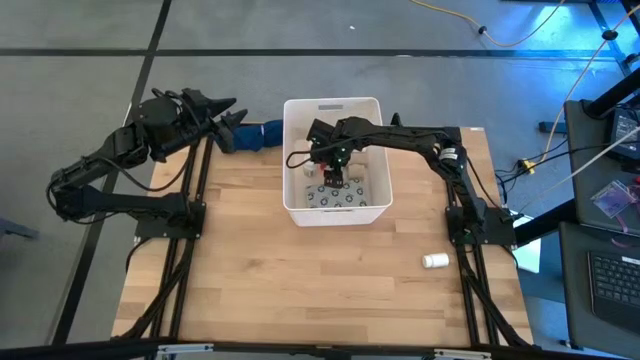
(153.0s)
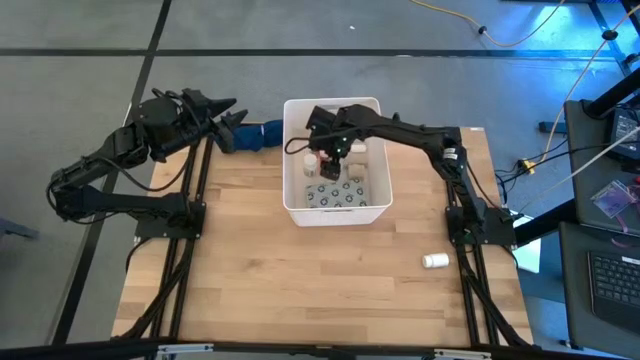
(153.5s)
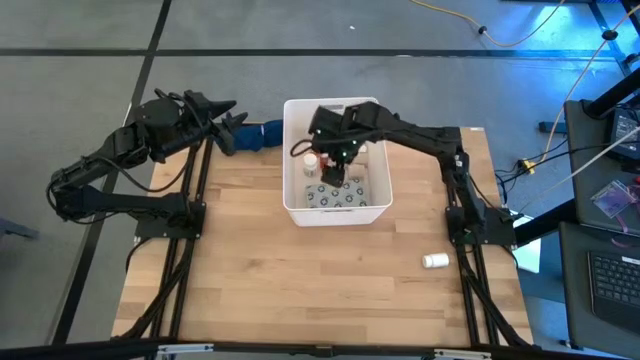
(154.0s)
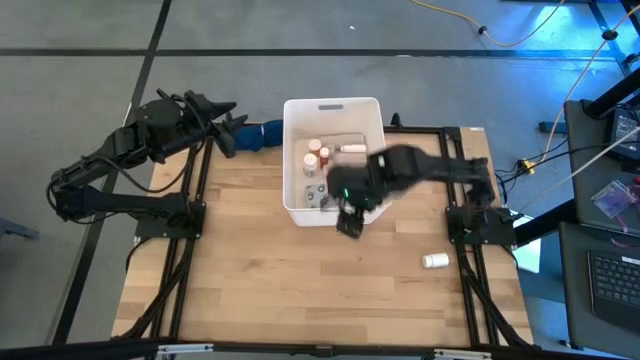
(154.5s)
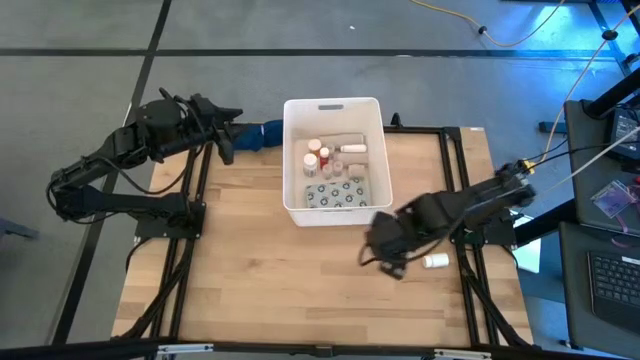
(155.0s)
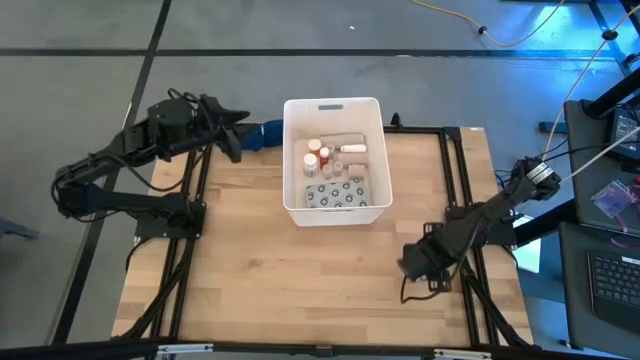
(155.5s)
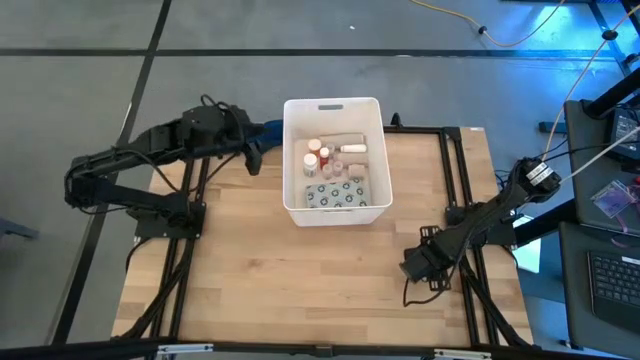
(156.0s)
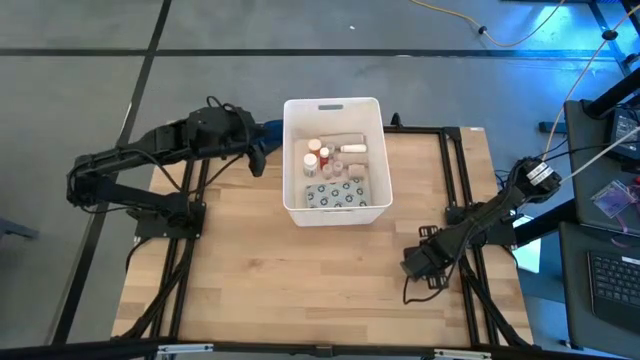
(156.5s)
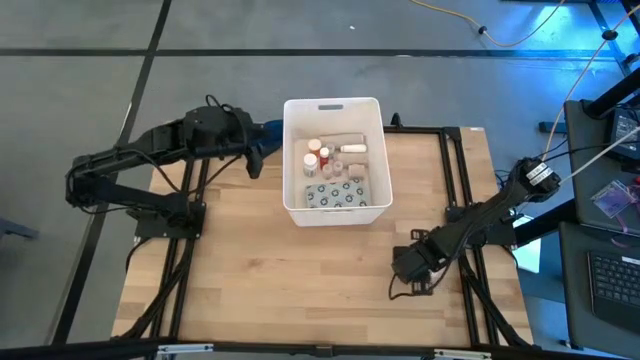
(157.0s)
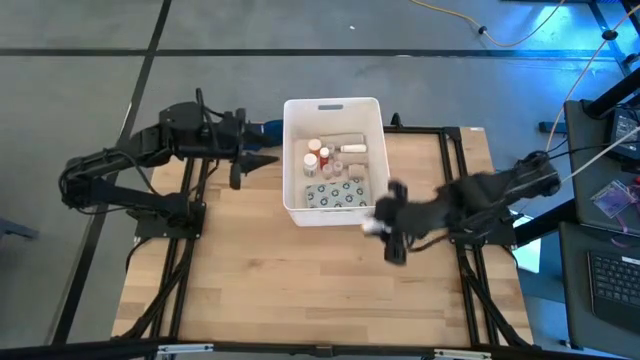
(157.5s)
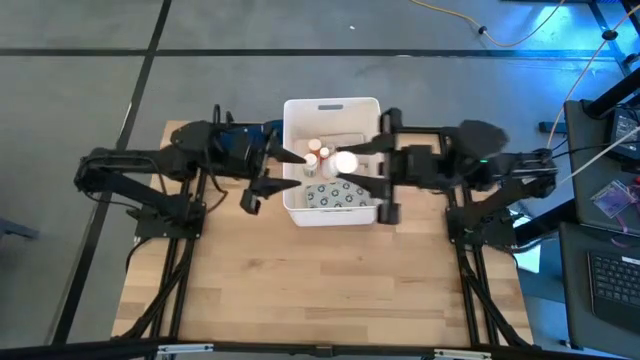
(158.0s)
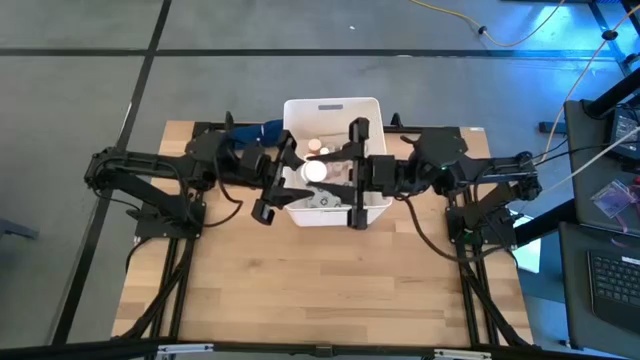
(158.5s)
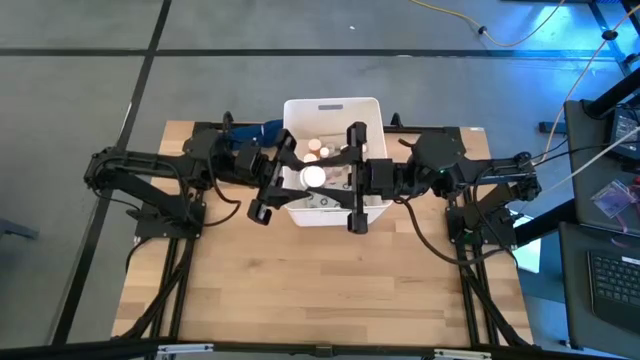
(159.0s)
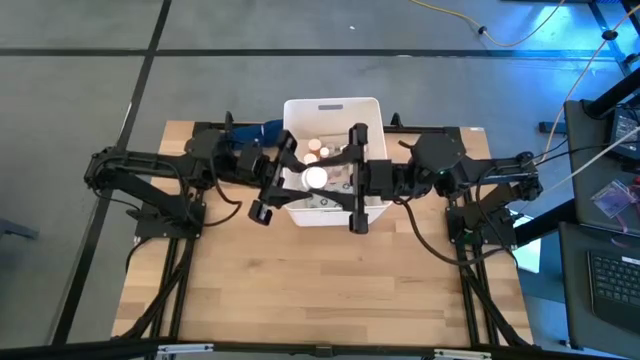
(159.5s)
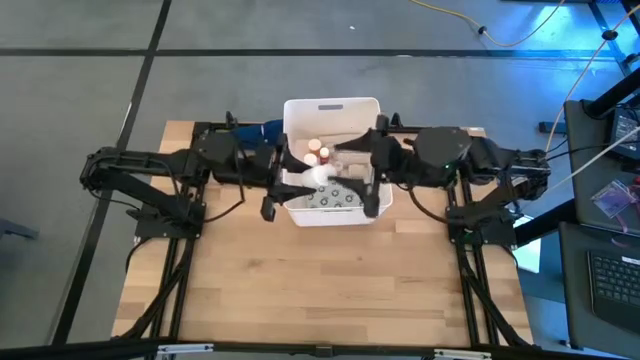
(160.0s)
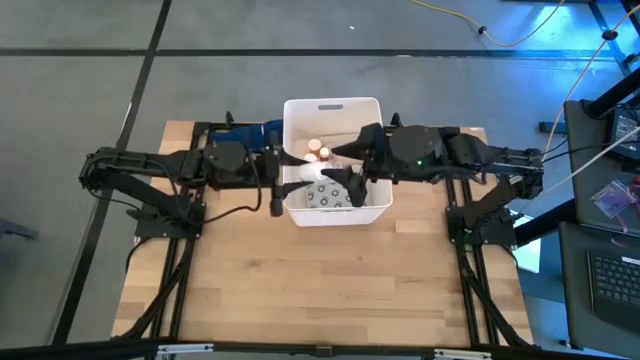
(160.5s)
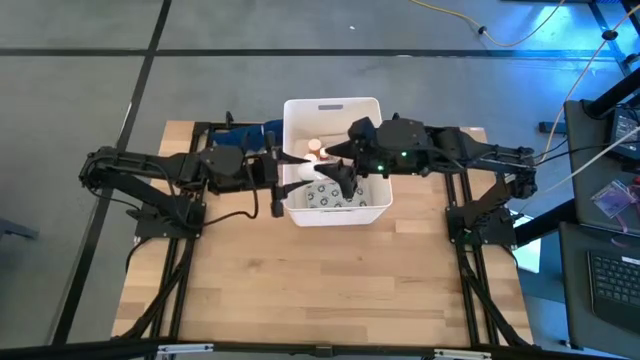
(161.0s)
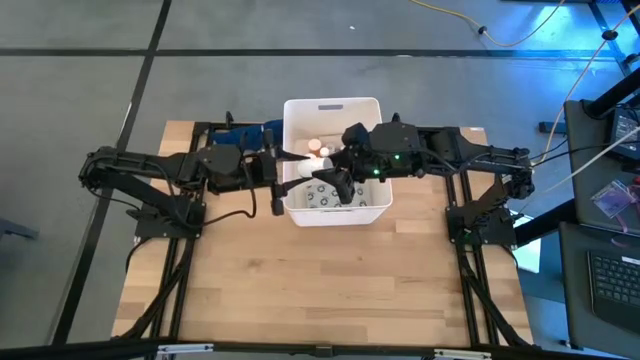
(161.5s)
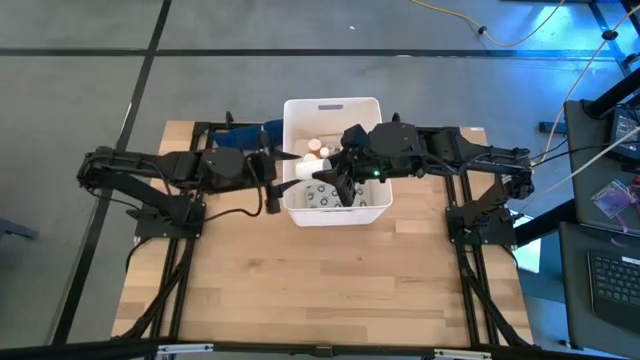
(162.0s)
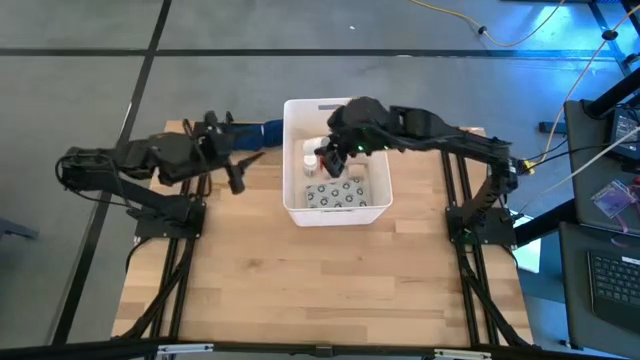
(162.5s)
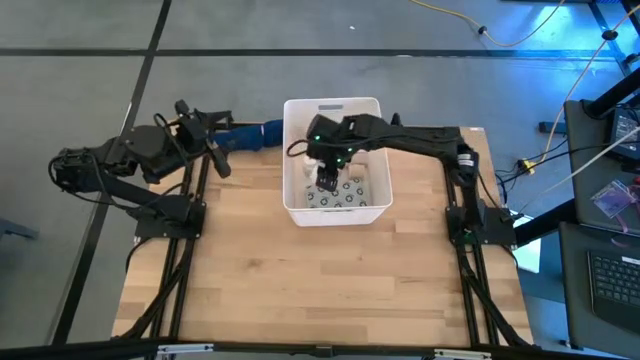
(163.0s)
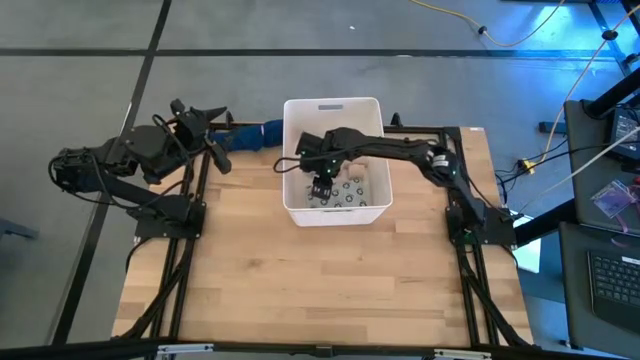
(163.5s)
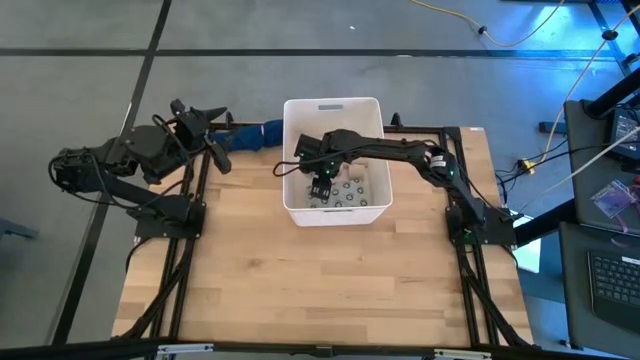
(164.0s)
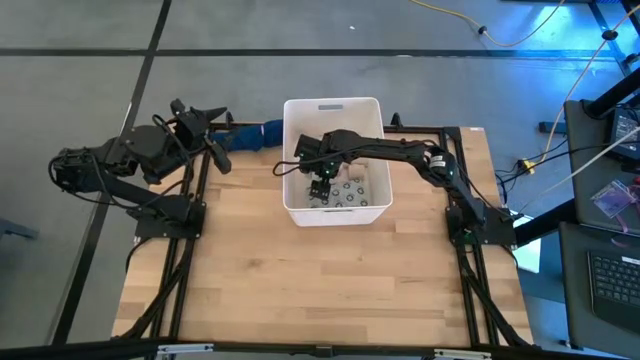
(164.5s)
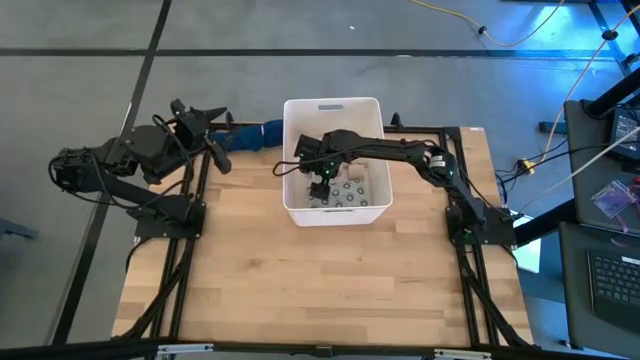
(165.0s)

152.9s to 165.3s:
Task: Pick & place medical supplies in basket/bin
Put the white medicine bottle into the bin

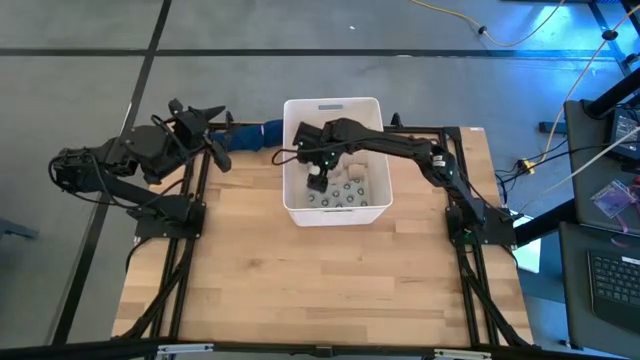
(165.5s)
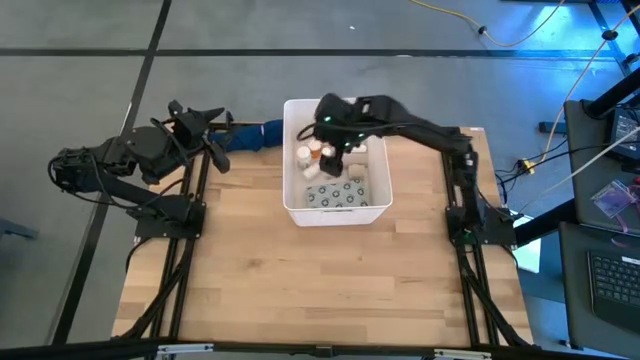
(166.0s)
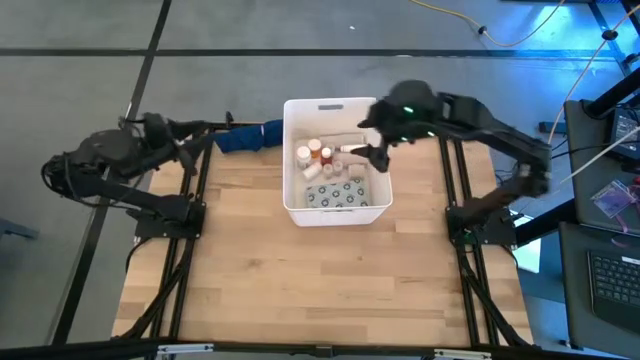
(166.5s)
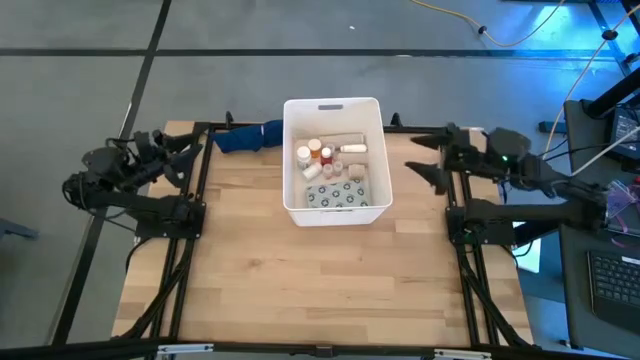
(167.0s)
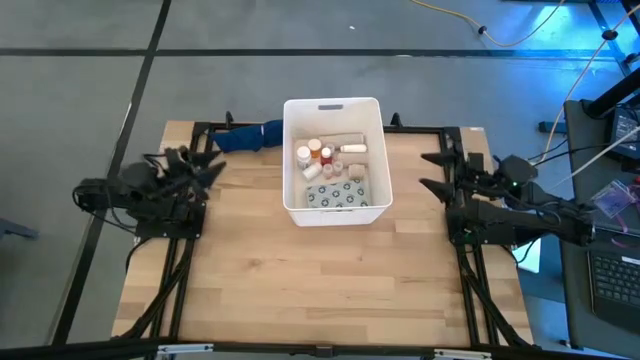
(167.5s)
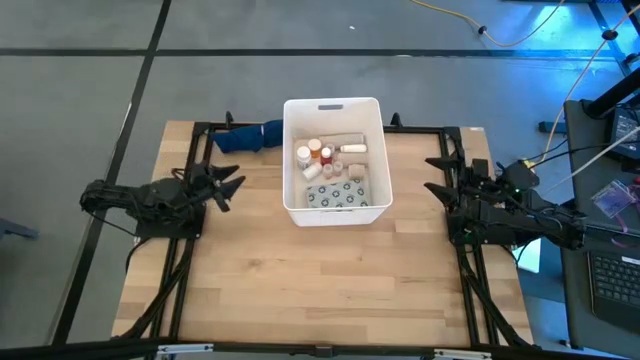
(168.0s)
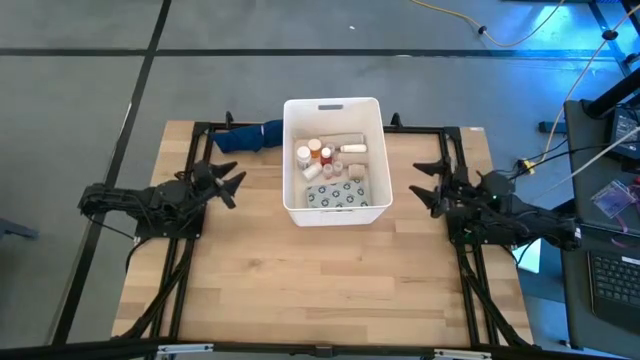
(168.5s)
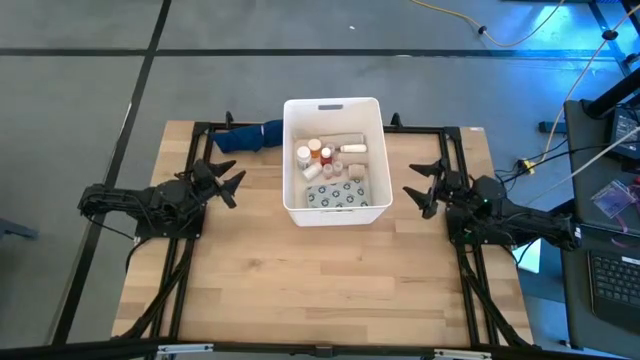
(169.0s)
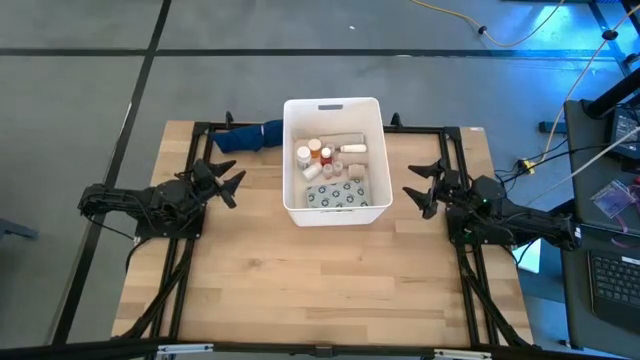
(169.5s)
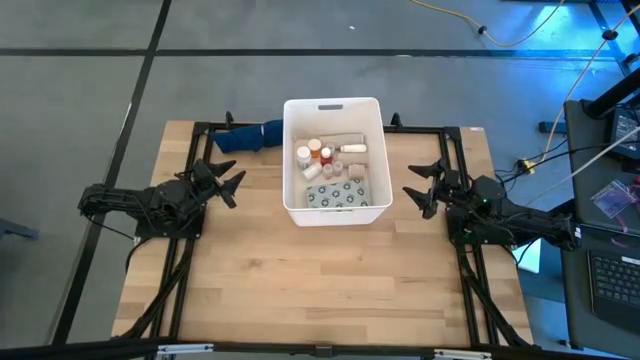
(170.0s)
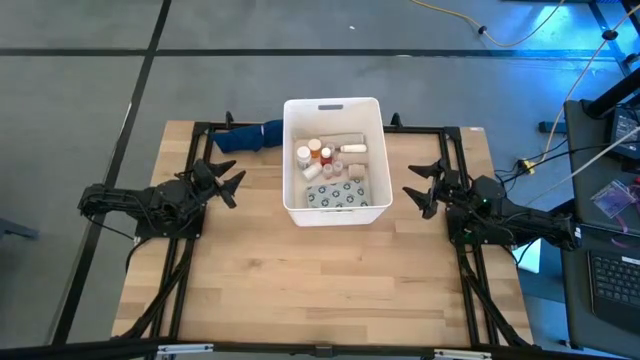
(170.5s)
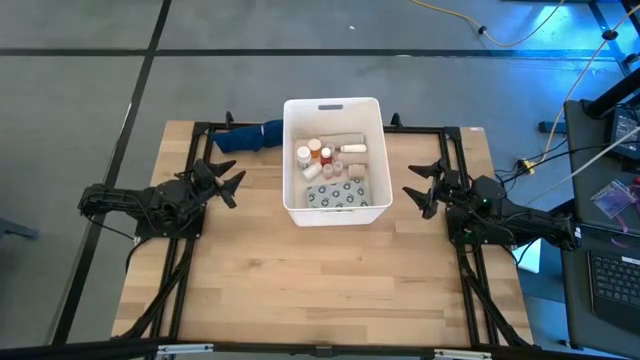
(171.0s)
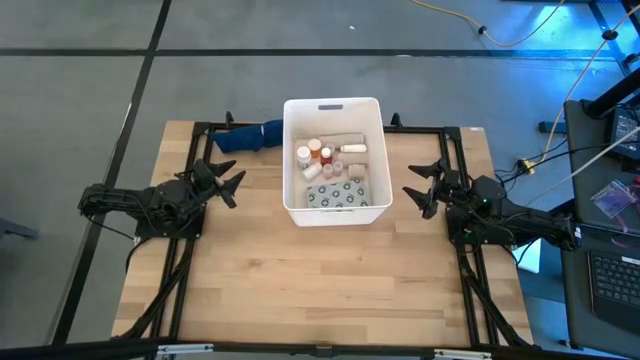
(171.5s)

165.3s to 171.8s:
Return to Home Position

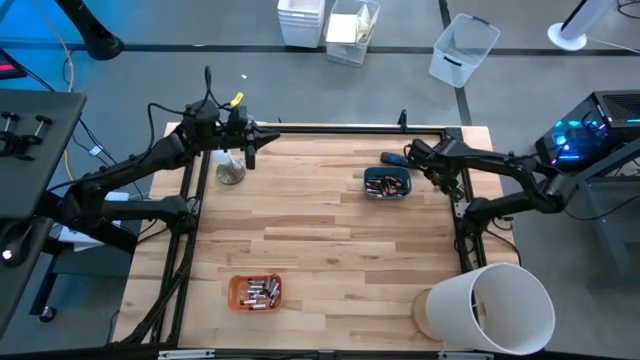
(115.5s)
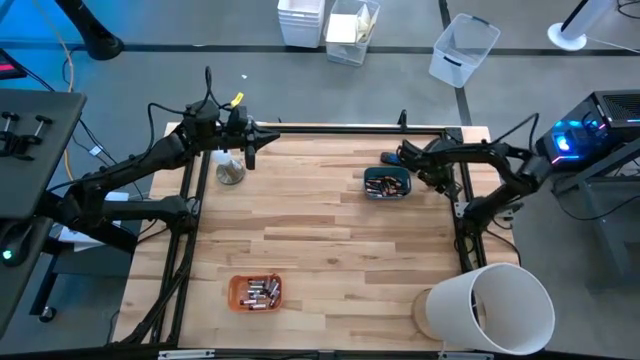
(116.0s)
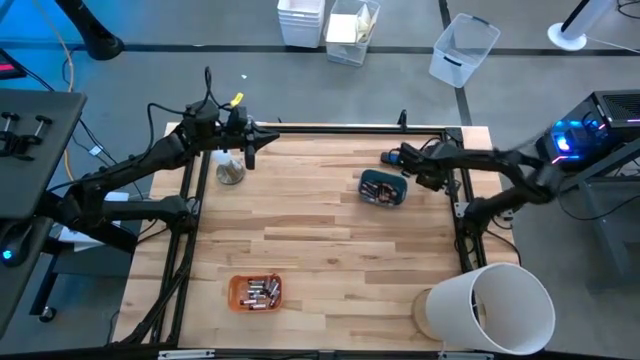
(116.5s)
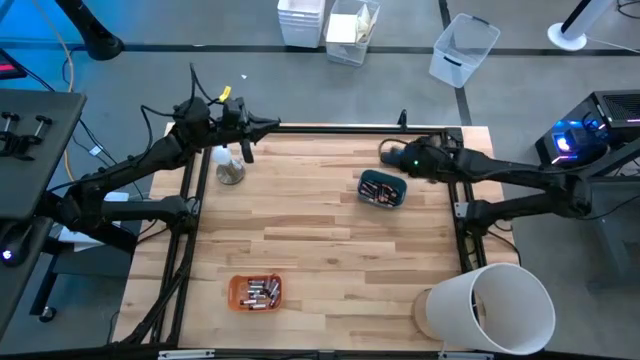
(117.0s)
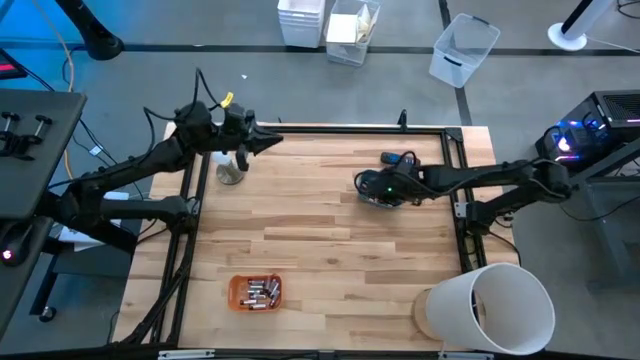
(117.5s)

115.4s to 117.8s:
Task: Sort batteries
Put the black battery into the blue bin
